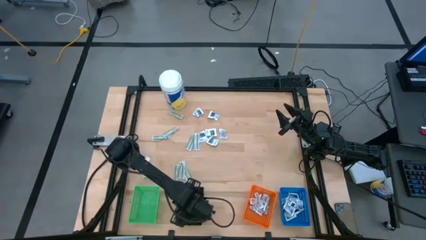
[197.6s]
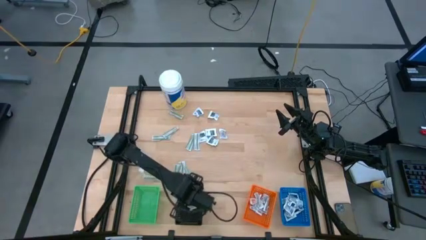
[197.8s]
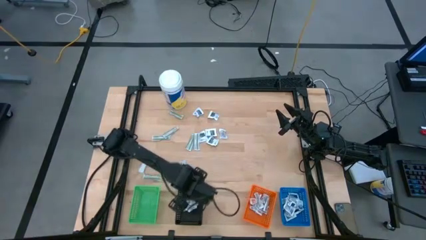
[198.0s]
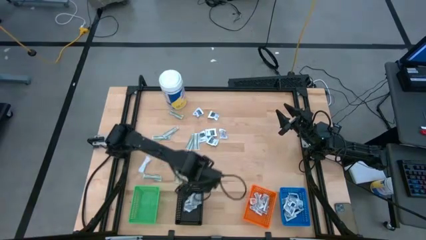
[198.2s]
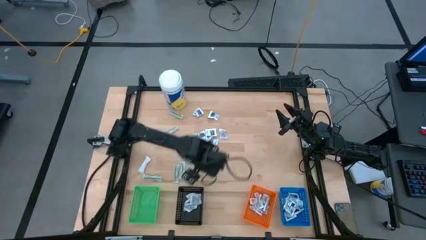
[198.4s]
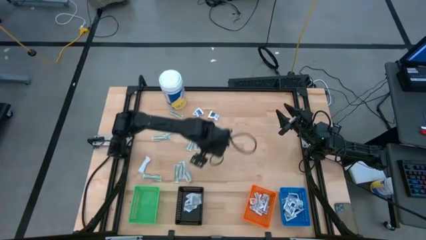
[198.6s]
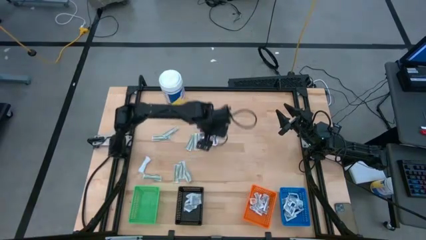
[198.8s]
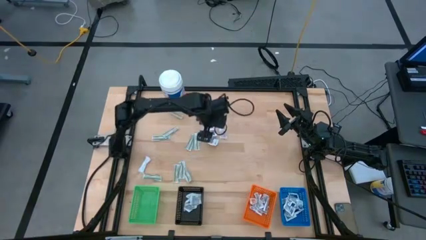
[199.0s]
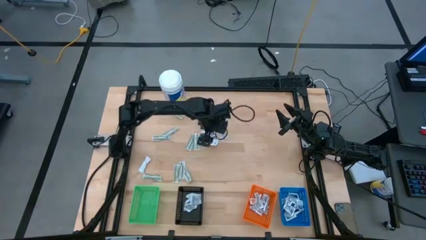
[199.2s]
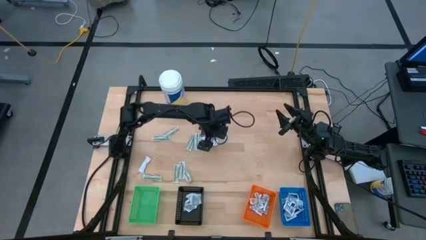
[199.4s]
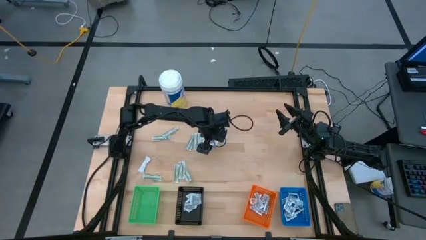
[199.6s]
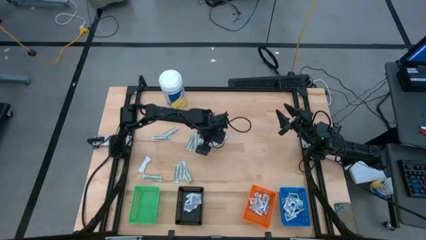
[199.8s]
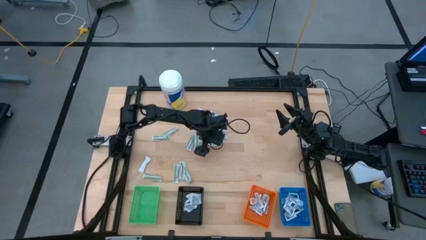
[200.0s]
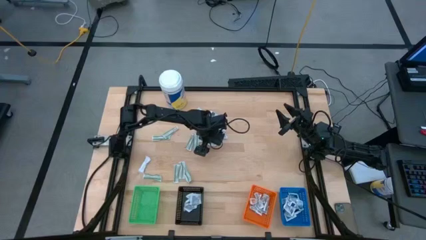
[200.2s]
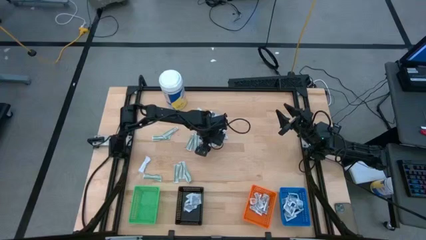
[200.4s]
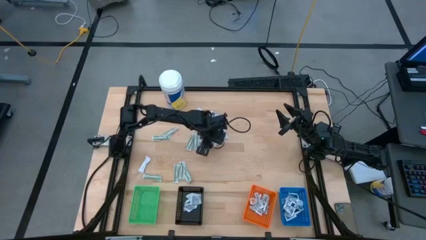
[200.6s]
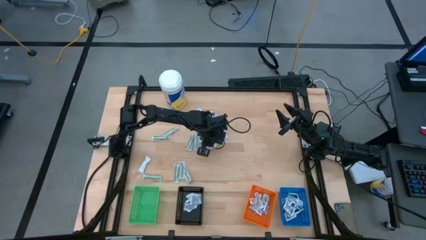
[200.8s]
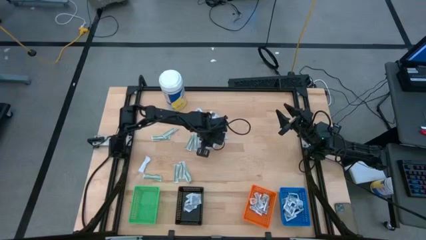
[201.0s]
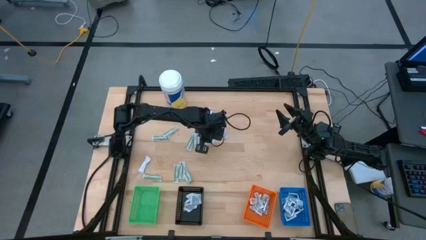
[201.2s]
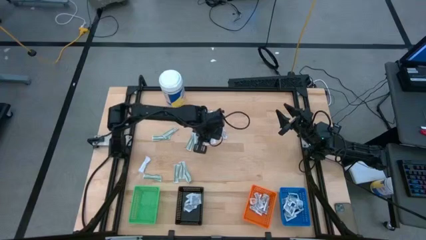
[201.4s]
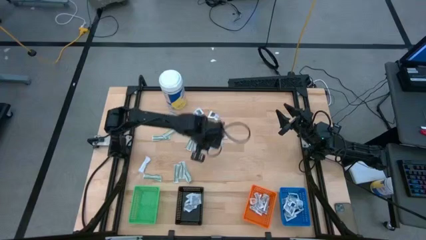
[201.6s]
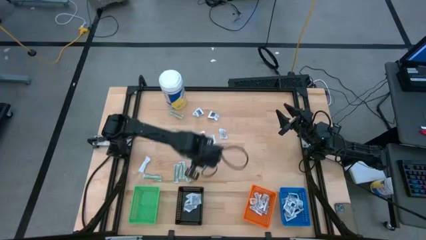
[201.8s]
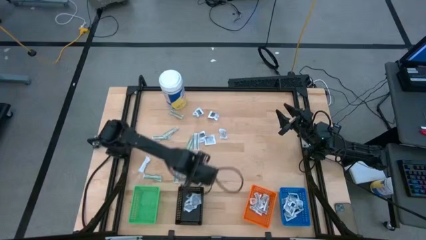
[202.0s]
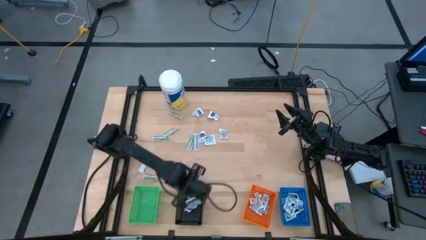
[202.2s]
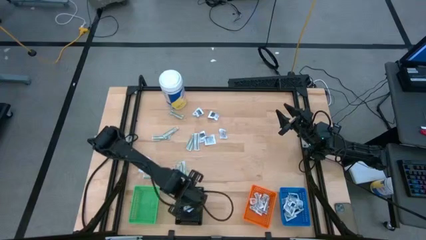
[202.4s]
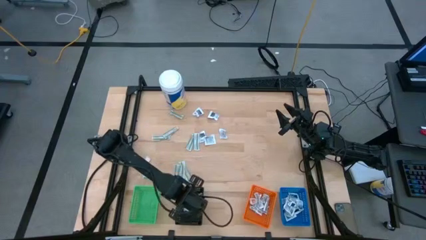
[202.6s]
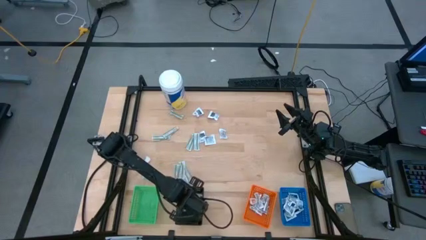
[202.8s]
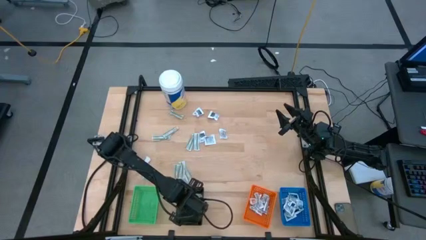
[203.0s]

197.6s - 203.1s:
Task: Pick & Place First Aid Supplies
Put the towelette pack into the black bin

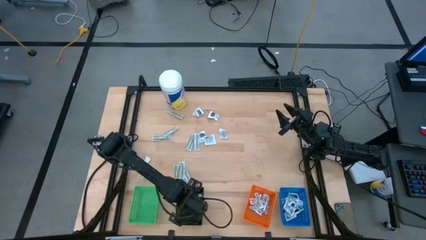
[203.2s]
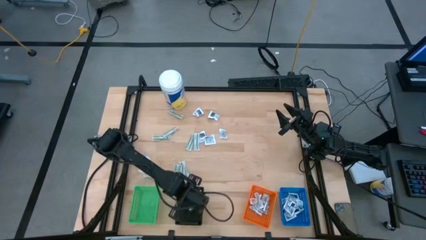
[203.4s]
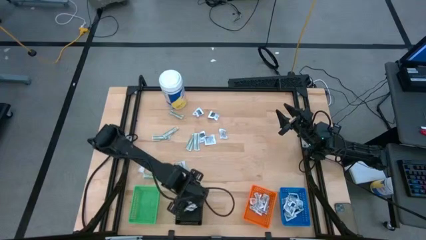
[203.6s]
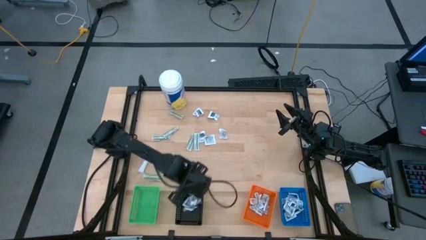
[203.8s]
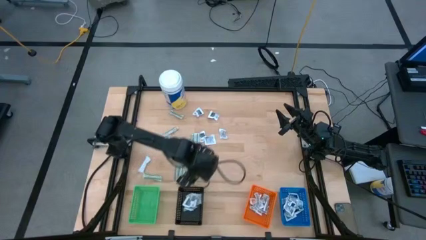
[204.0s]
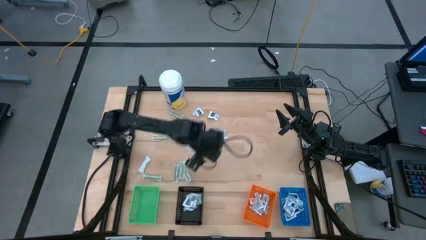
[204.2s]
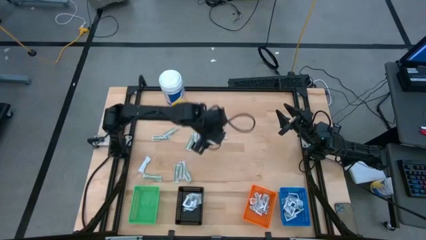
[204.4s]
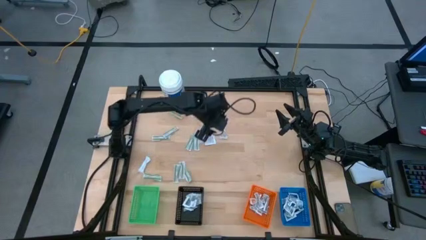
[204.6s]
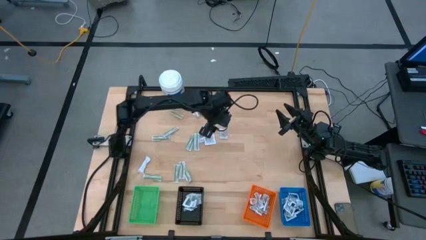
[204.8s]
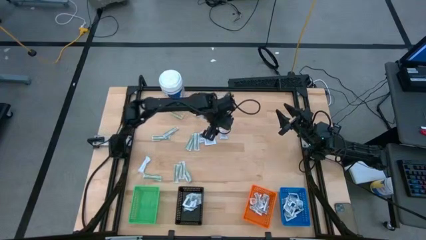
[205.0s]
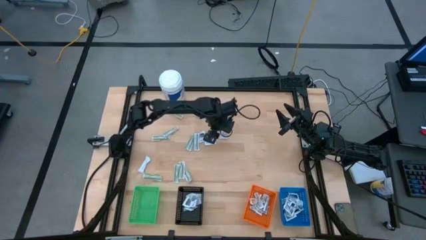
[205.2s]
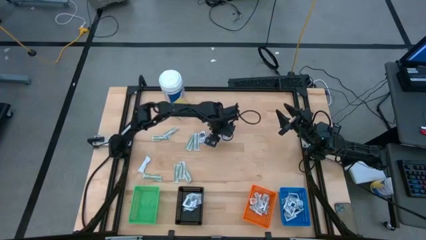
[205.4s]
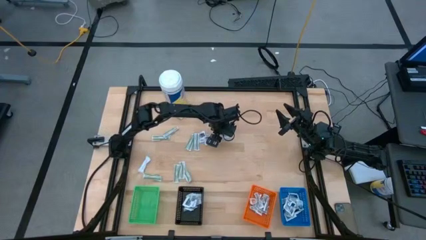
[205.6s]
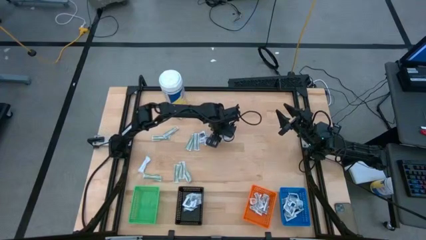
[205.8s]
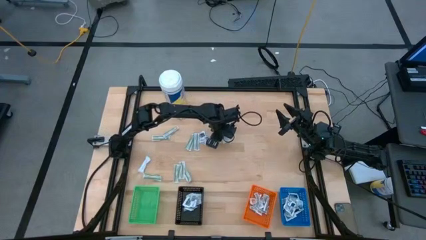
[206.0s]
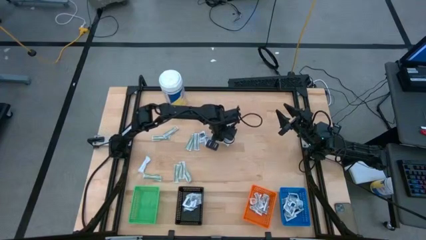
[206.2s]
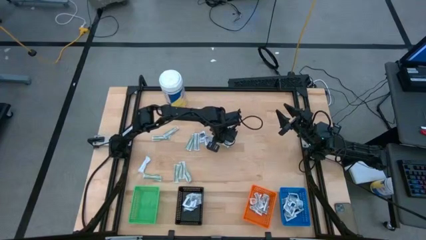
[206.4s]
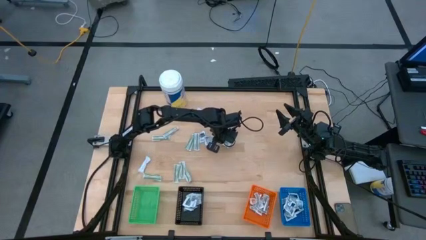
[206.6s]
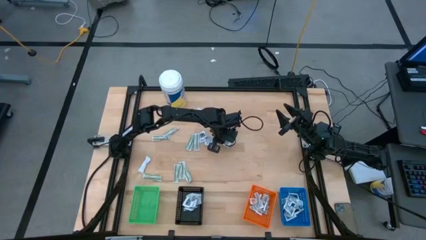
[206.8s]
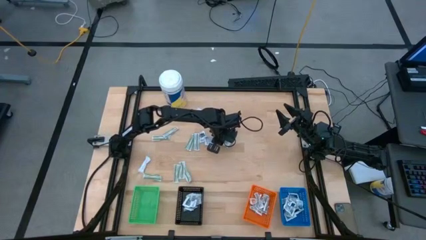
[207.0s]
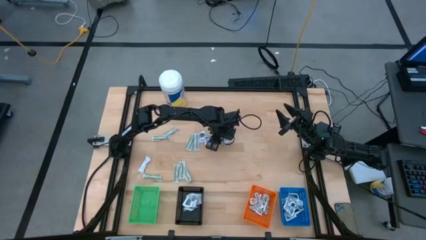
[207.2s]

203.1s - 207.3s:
Put the towelette pack into the black bin

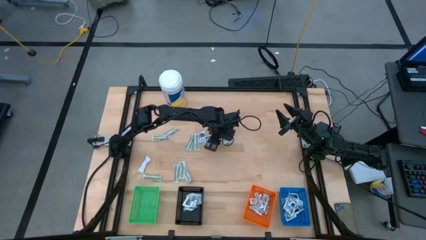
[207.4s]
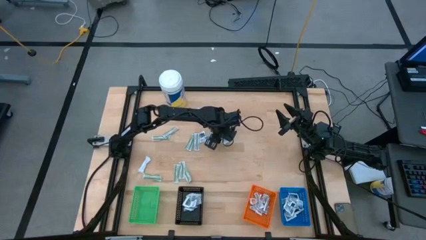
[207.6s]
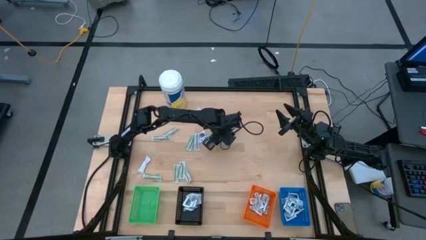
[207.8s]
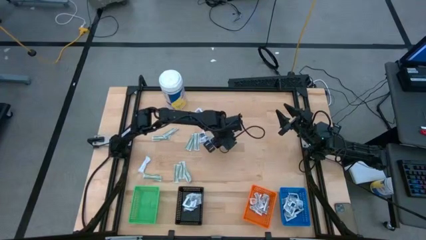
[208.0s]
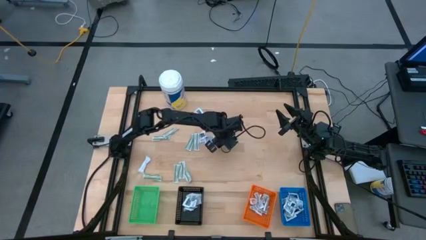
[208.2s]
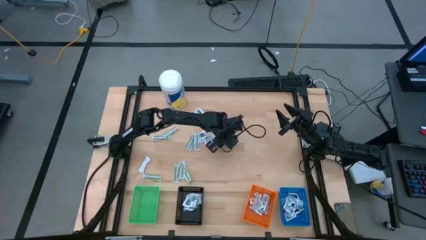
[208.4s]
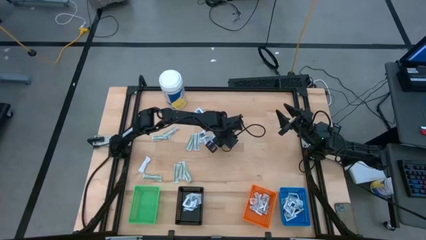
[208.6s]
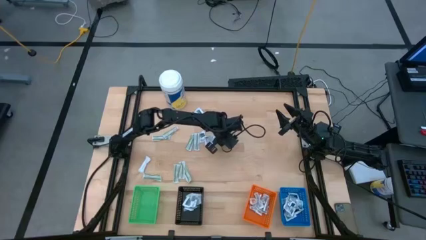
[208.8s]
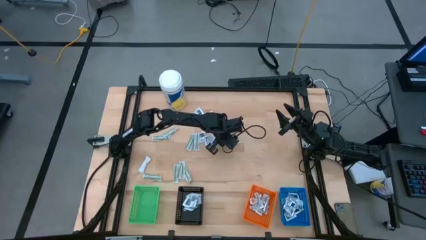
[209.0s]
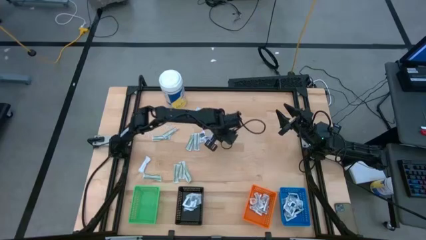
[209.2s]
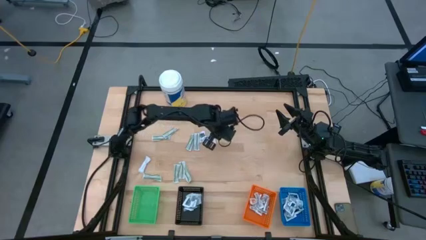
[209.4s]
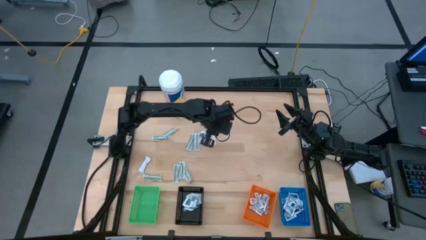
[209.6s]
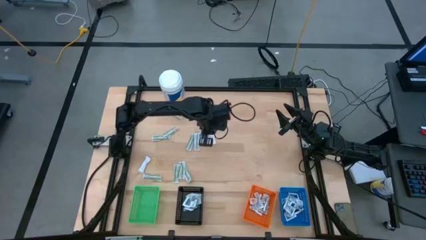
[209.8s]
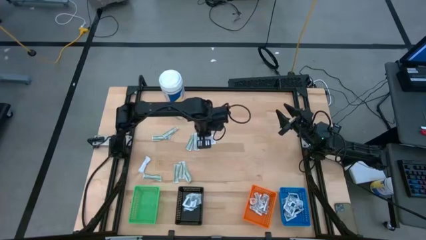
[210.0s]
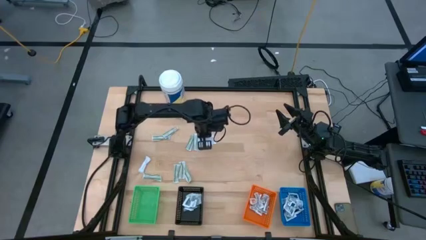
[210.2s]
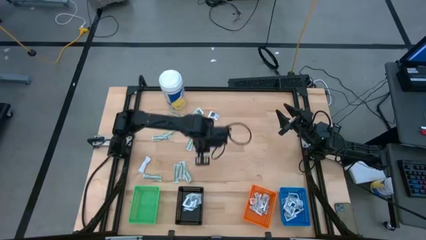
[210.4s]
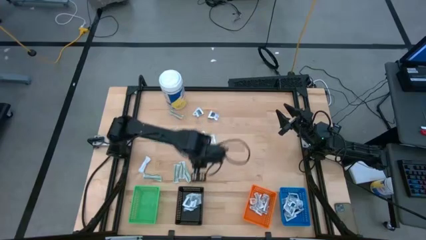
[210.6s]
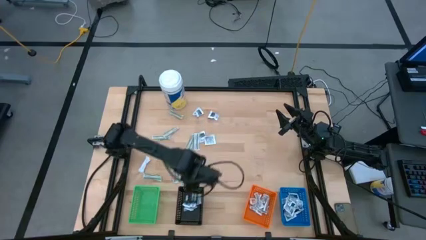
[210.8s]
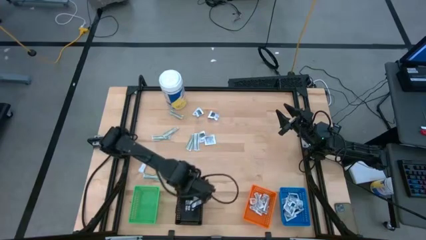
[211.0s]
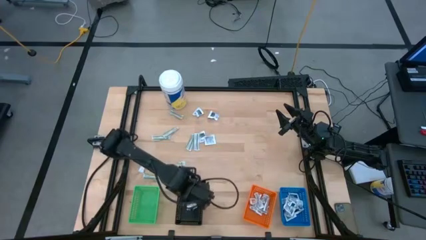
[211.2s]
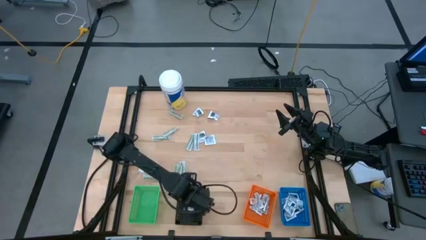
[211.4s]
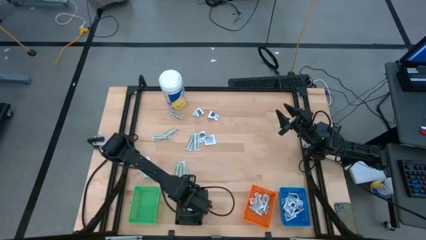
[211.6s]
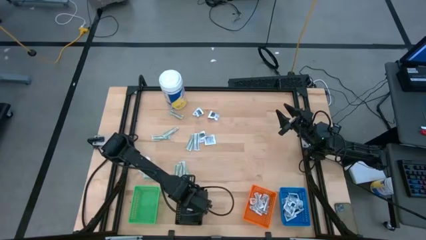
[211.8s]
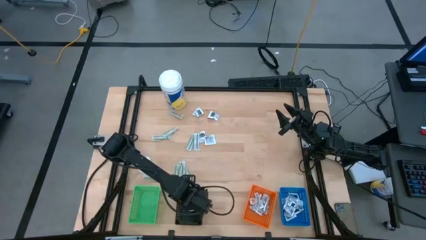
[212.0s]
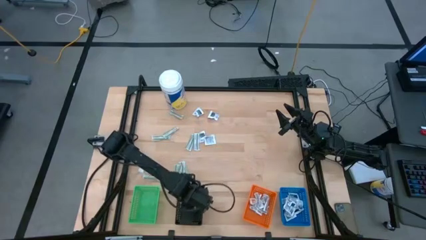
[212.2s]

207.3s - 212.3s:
Put the towelette pack into the black bin

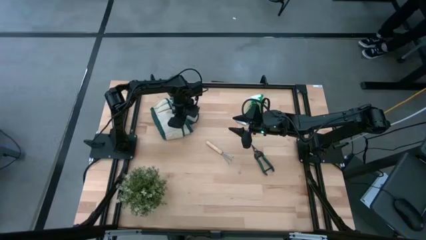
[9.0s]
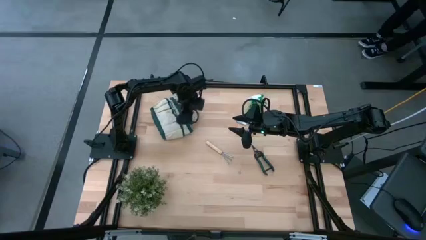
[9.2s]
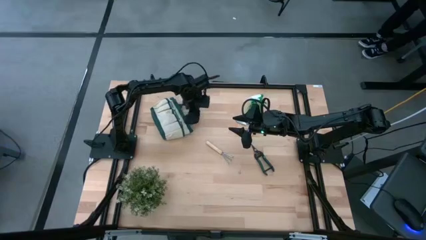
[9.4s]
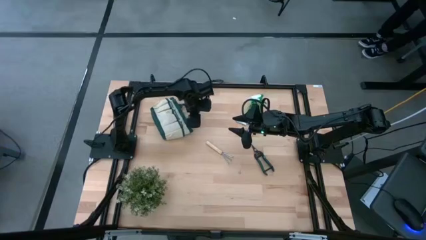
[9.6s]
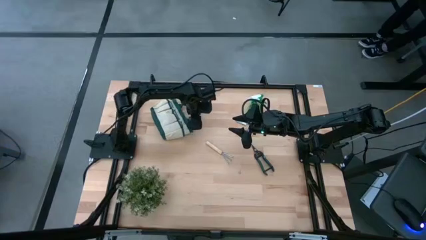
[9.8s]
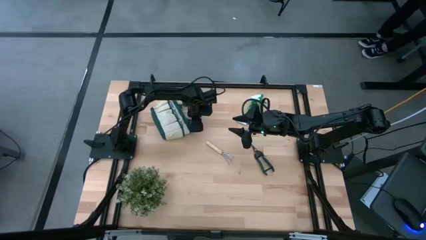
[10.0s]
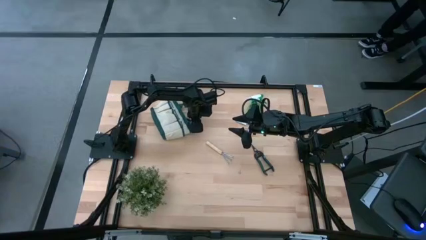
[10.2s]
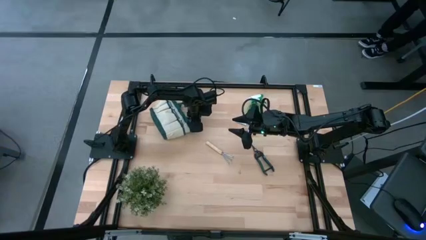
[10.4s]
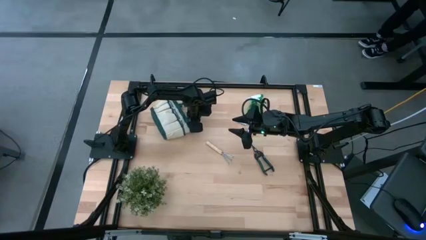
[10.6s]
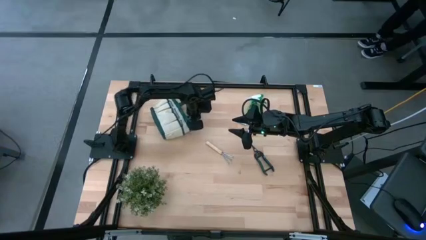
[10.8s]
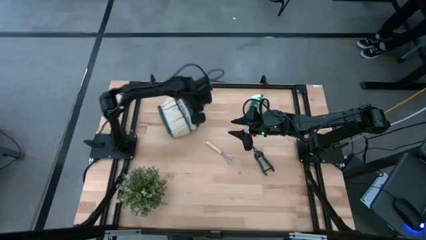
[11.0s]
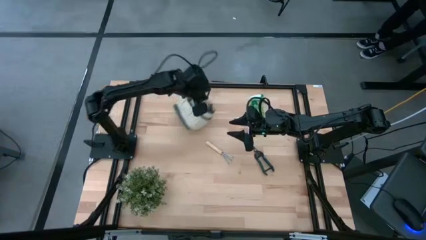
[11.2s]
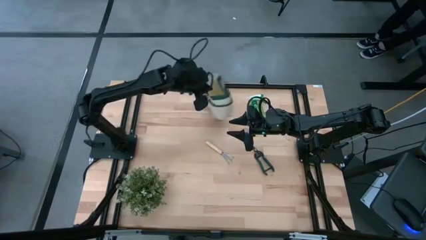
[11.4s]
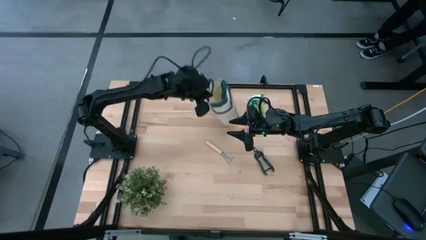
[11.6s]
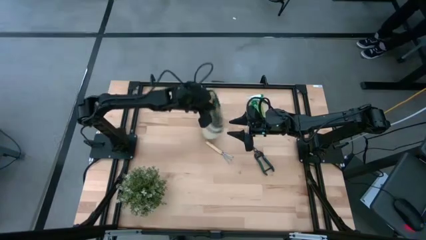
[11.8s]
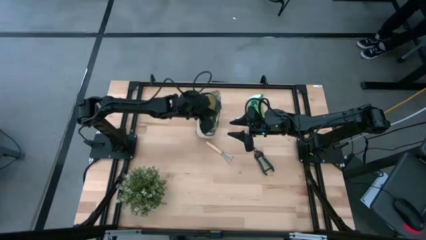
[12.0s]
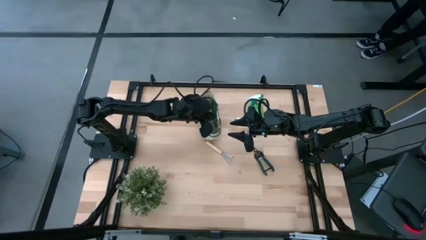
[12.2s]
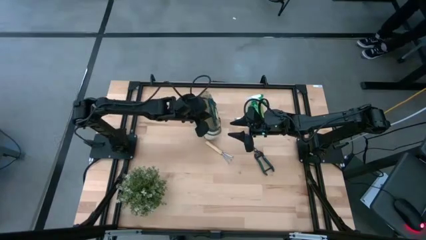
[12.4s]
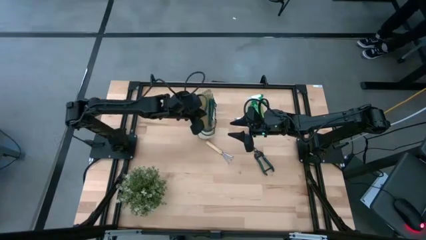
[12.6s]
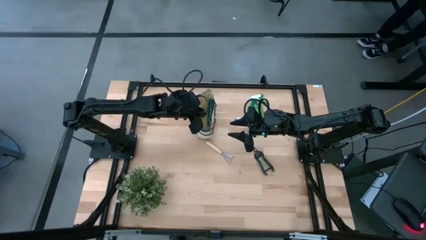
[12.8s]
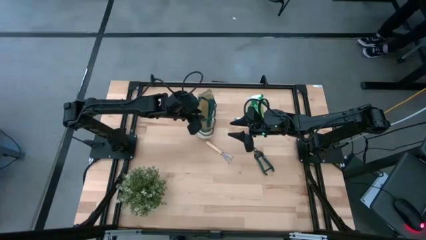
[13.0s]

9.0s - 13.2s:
Task: Pick & Place Garden tools in Gardening bag
Prepare the gardening bag
